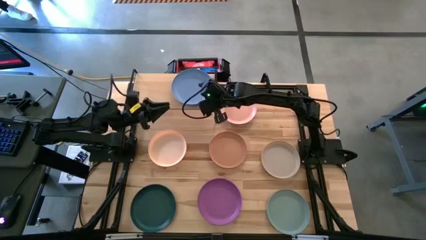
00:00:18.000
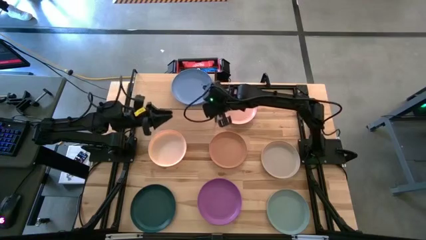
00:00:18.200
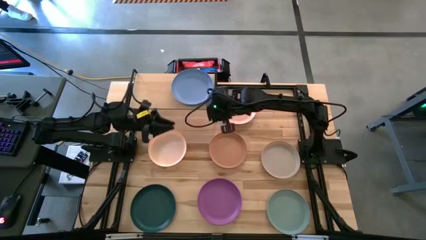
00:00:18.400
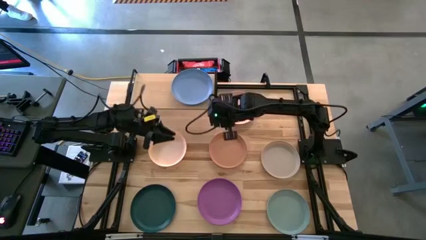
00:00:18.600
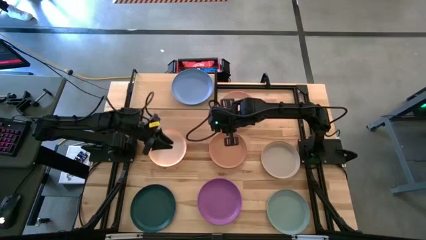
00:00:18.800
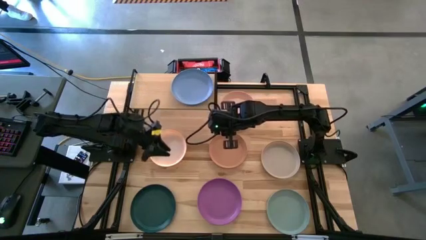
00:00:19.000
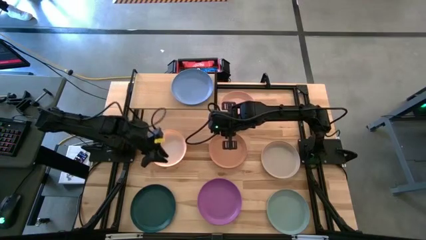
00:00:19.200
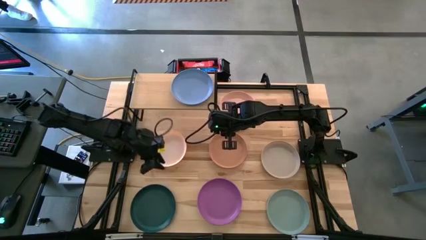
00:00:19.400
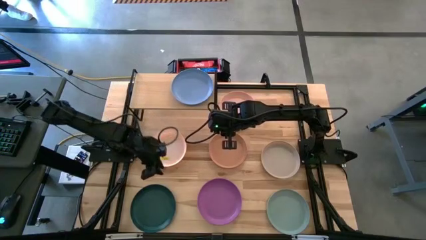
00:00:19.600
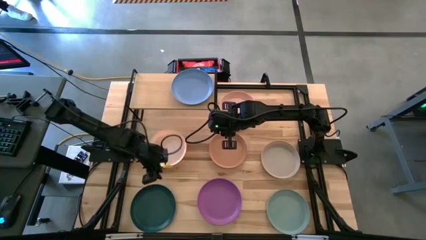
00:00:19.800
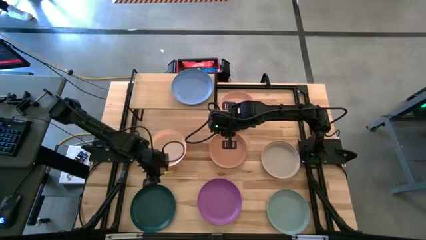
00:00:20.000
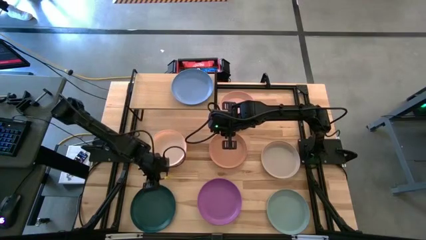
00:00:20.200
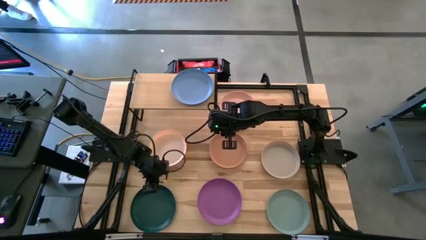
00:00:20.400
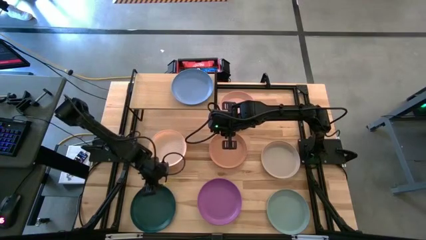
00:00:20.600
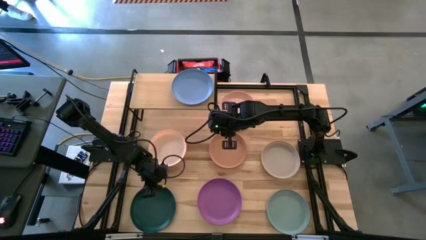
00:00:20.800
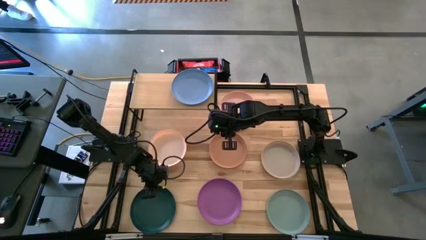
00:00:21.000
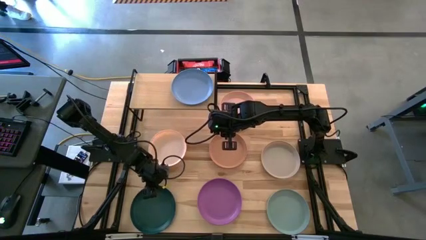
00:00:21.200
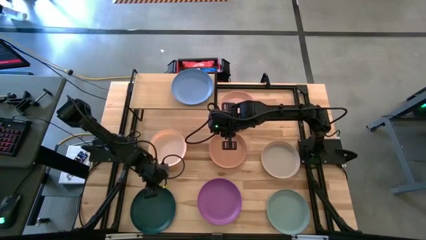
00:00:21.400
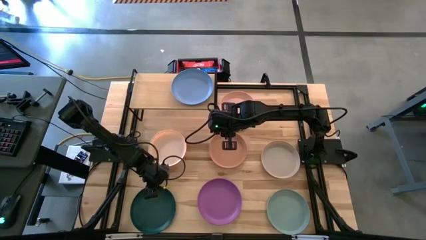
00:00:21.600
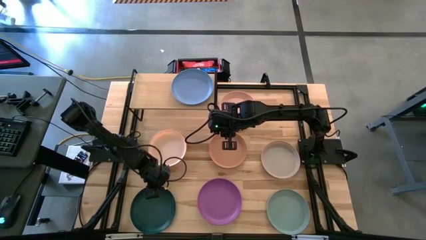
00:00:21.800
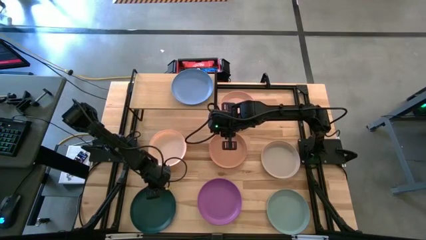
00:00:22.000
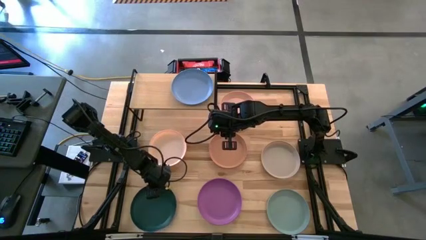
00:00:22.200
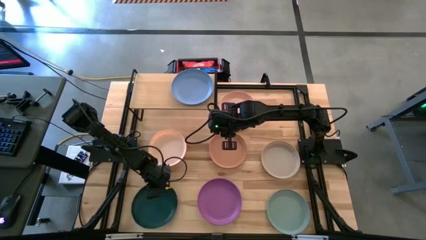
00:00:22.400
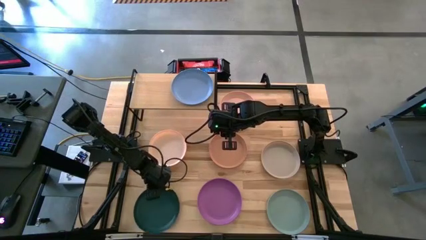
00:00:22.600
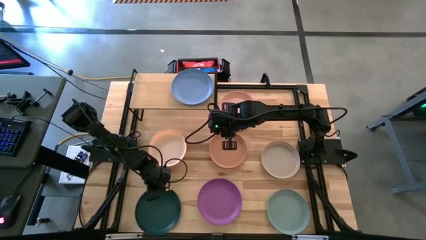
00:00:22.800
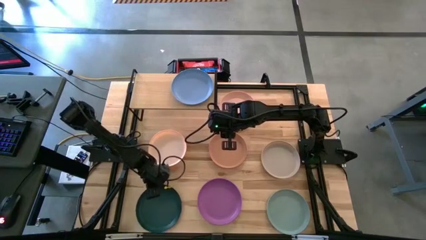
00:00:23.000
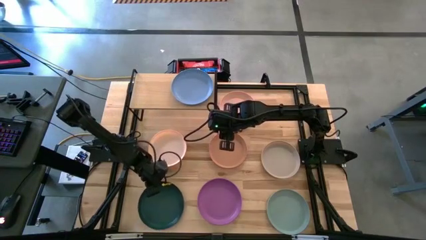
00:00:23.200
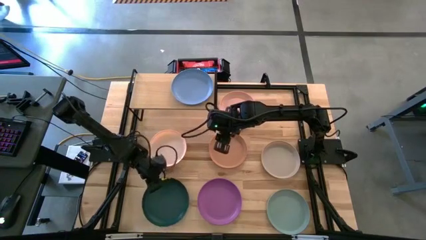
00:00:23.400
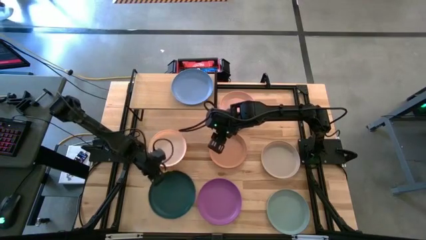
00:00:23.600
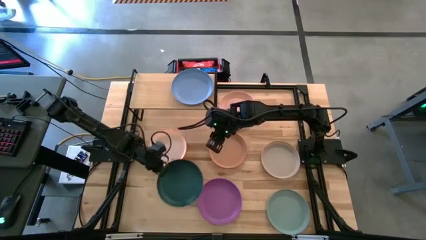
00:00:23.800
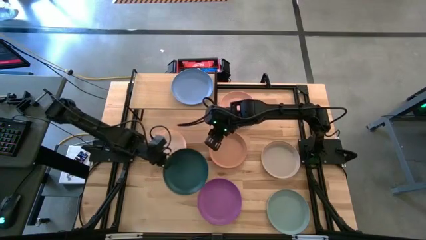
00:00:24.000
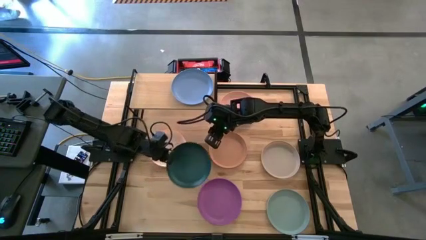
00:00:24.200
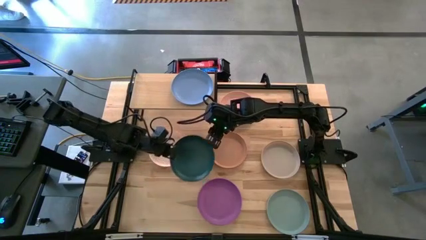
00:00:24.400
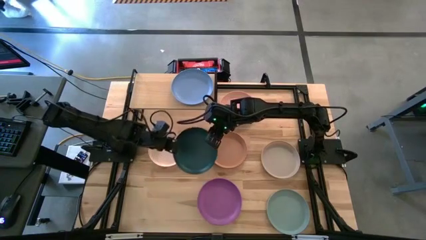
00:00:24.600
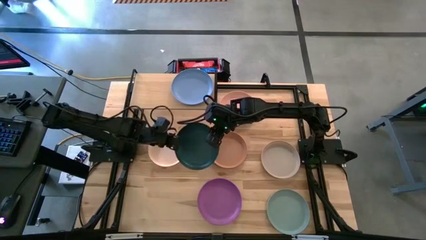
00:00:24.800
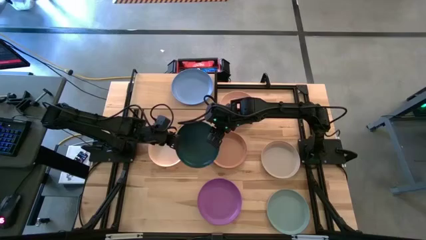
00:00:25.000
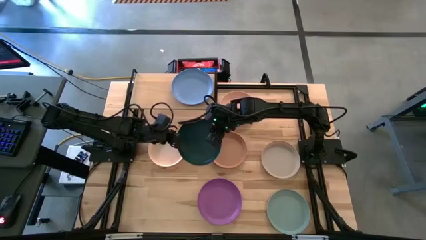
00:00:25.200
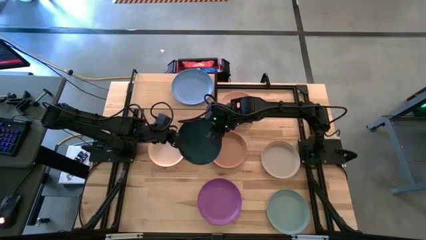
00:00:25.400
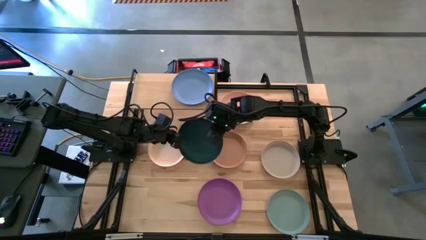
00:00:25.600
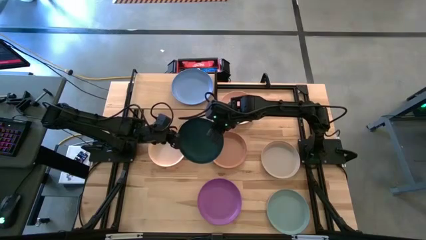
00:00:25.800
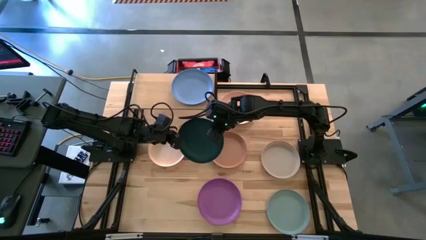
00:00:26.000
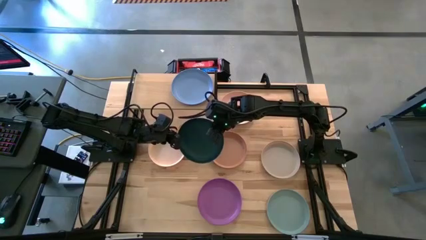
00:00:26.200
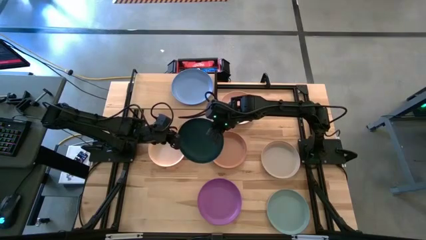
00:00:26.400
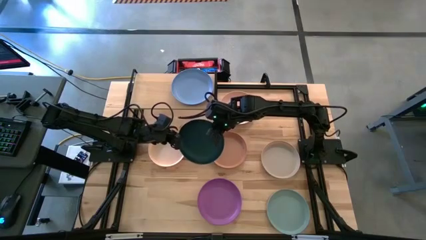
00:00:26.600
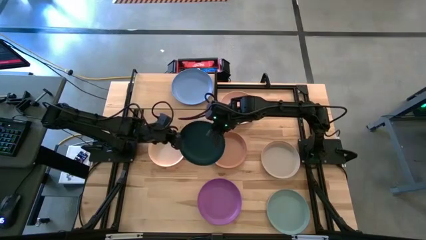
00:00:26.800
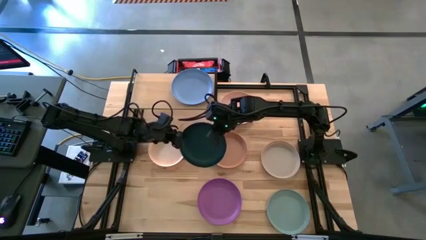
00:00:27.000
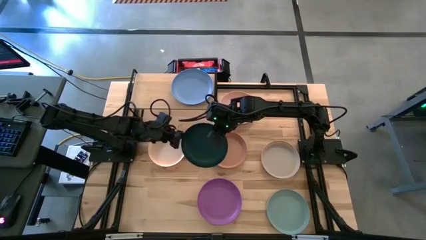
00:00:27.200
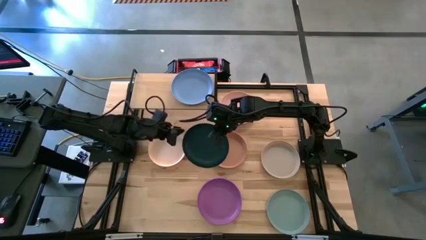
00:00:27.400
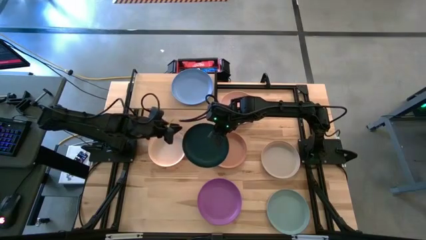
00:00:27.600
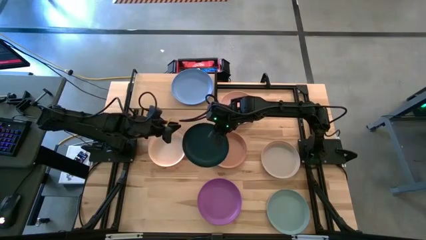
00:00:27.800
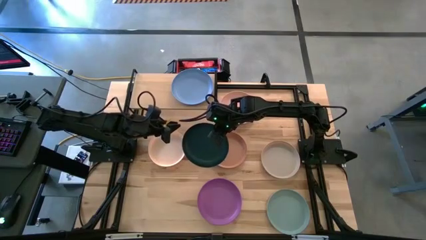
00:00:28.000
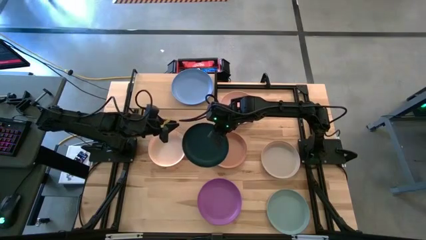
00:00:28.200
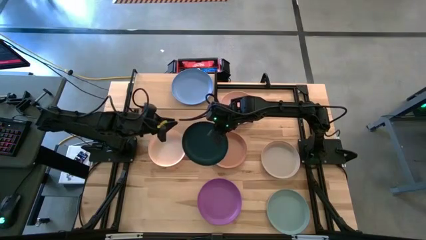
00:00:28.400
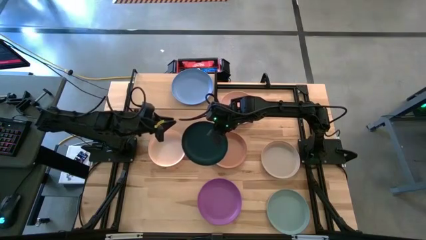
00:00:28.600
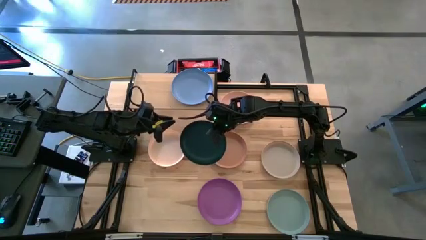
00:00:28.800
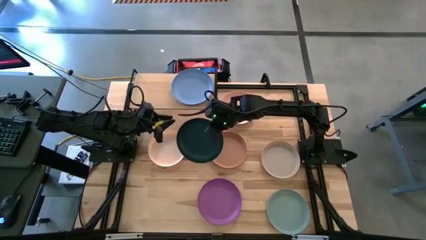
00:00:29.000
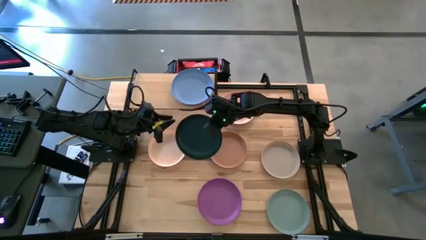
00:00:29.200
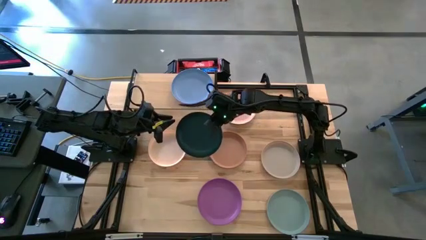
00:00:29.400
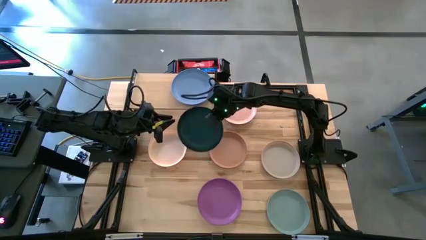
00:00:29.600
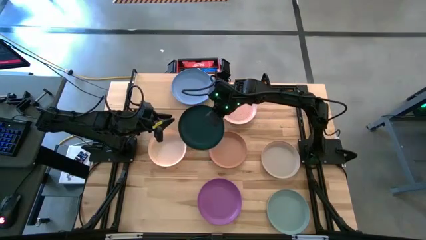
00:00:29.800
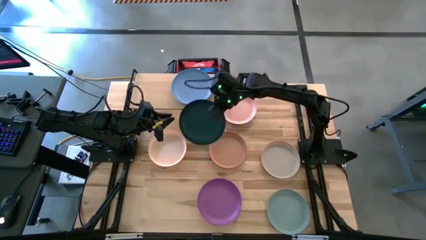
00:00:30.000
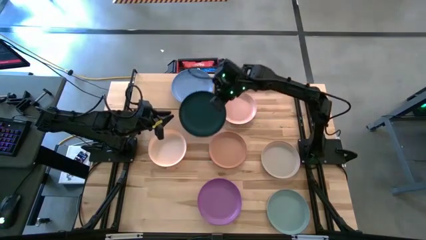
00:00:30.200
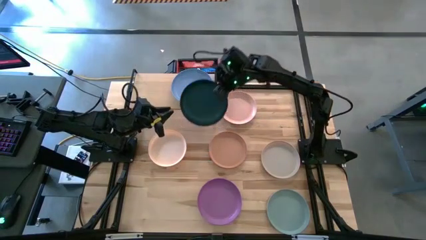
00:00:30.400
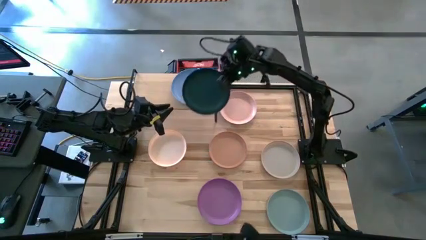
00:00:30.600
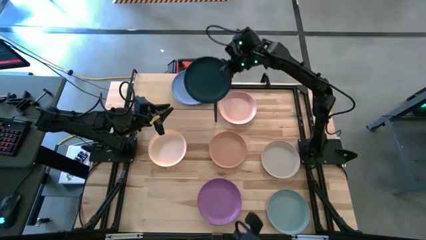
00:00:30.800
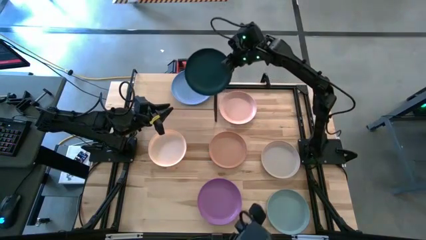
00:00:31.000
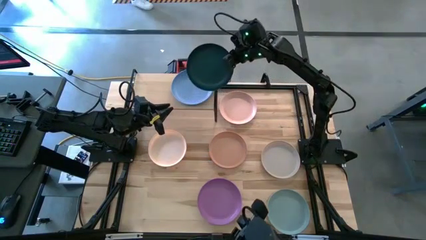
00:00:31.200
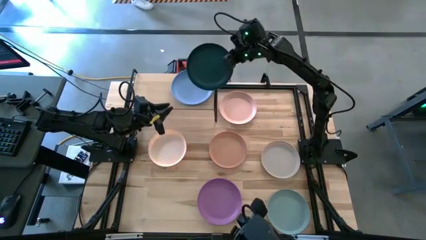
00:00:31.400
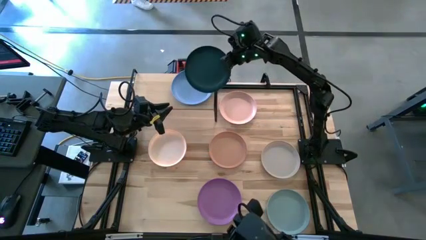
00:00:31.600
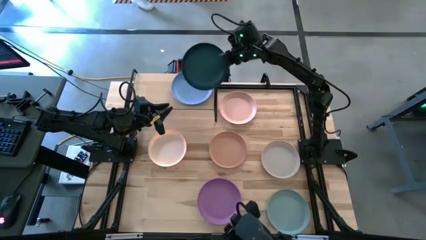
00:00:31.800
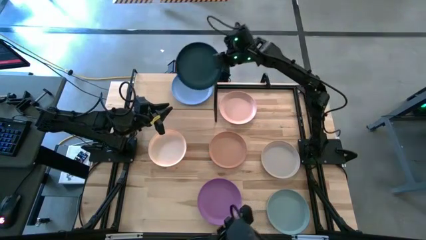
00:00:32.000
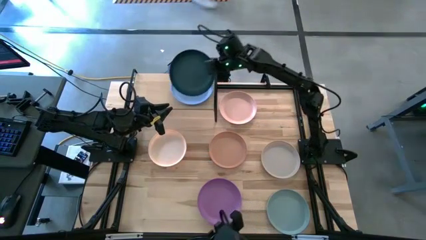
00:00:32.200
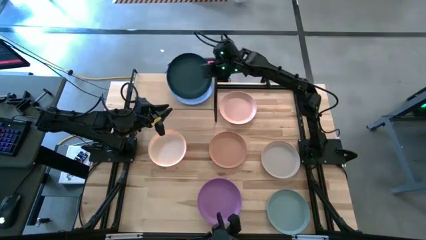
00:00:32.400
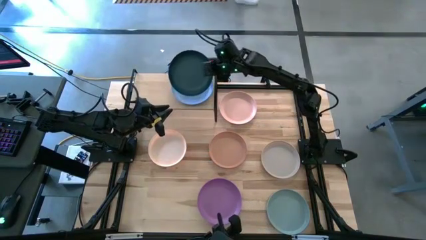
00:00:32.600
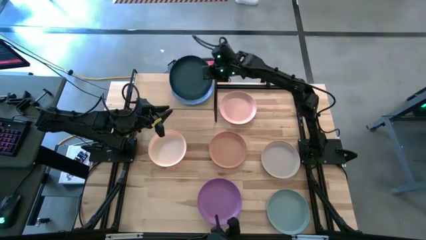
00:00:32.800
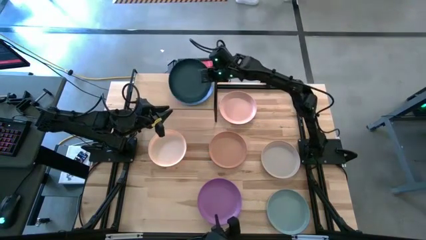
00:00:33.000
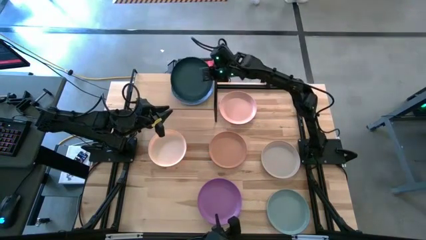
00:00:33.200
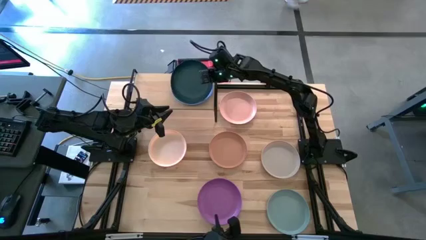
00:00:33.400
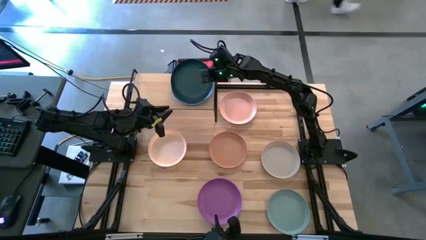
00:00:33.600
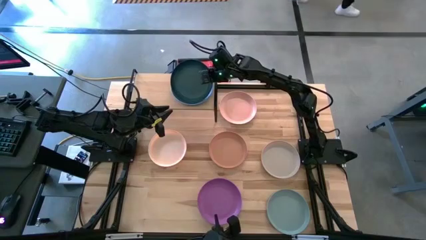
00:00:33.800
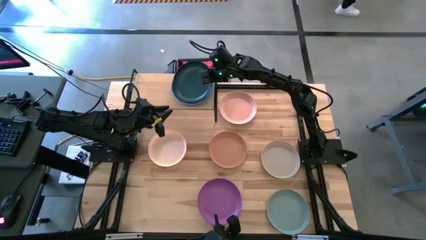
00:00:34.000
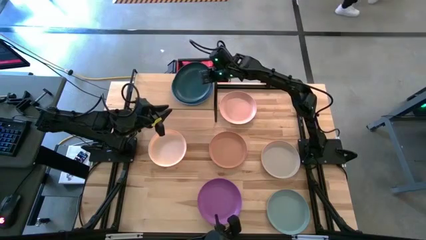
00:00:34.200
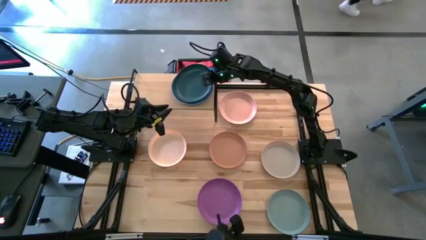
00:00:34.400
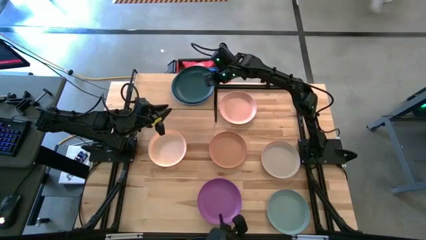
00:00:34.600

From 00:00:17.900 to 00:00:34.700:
Task: Place and stack plates onto a shelf
Stack the dark green plate on top of the blue plate on the shelf
